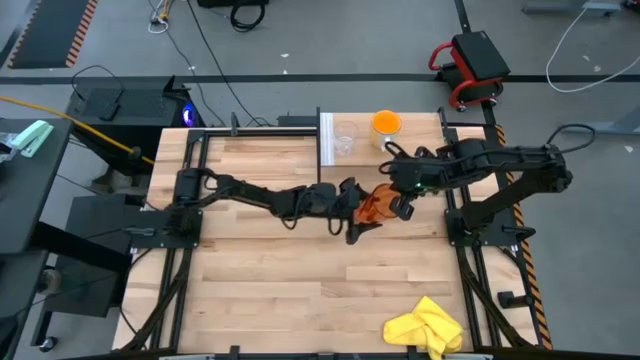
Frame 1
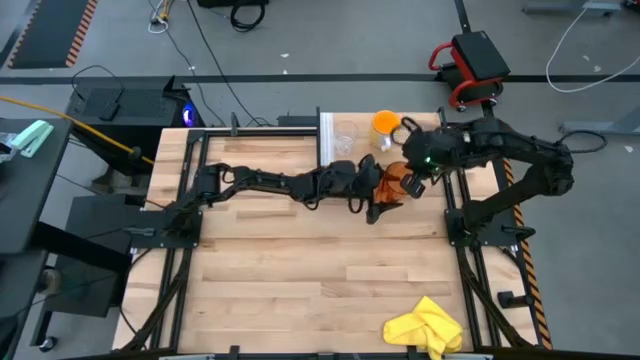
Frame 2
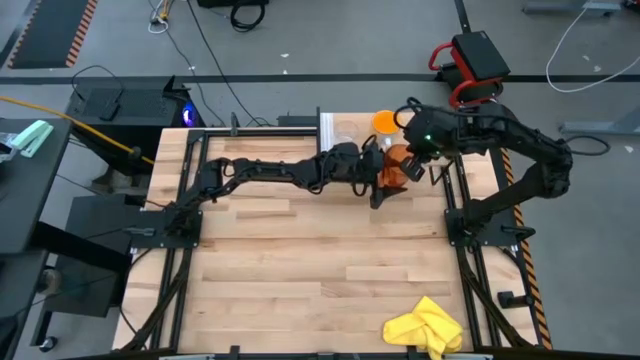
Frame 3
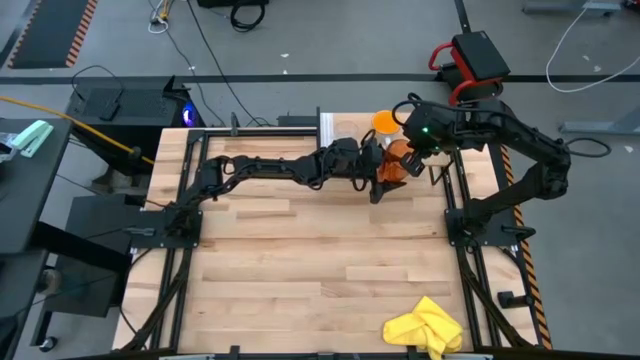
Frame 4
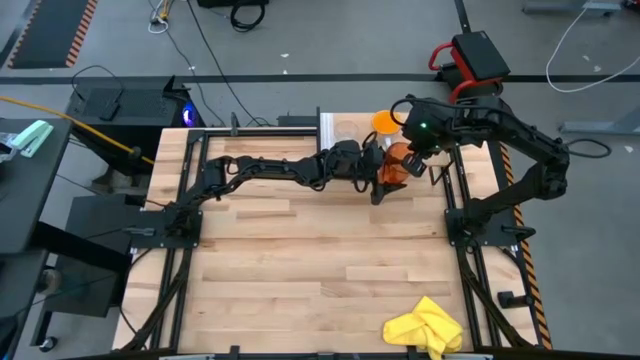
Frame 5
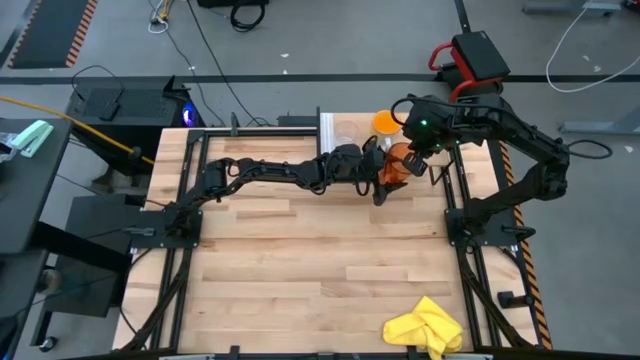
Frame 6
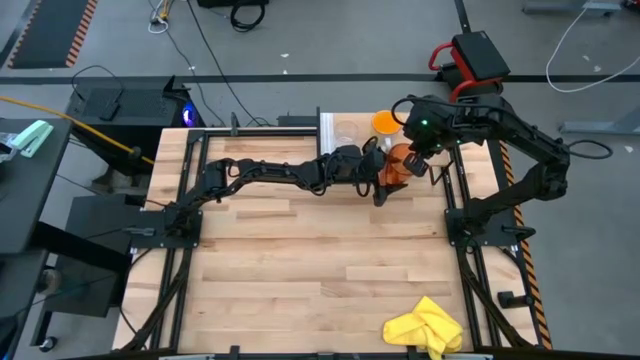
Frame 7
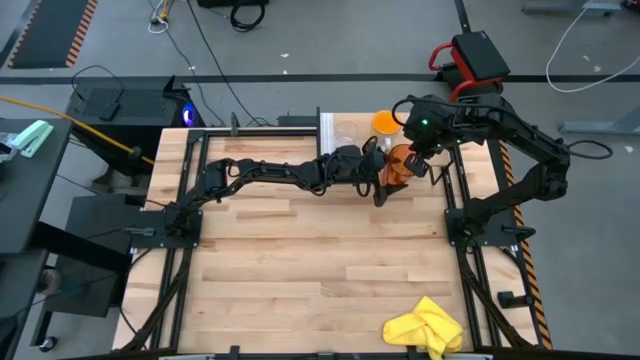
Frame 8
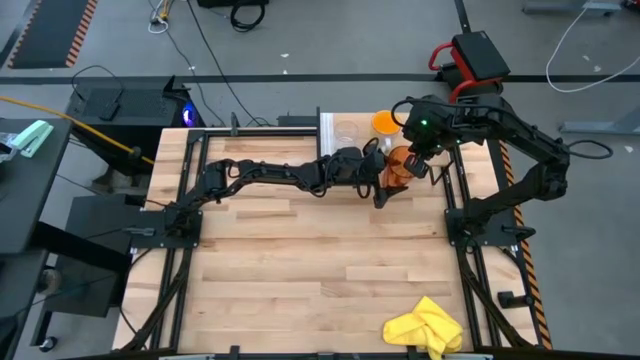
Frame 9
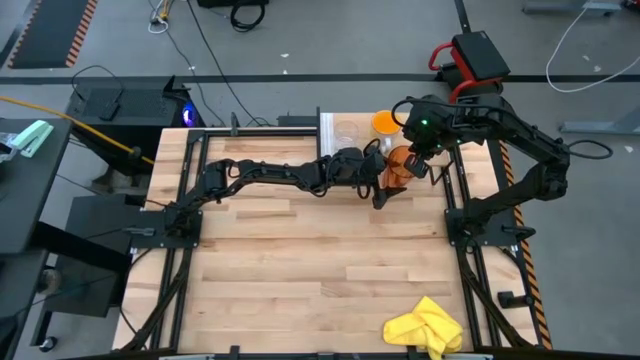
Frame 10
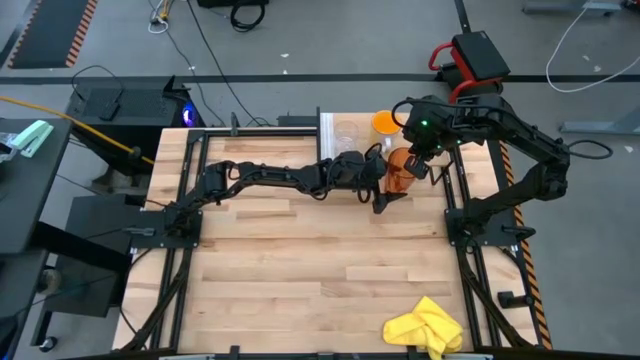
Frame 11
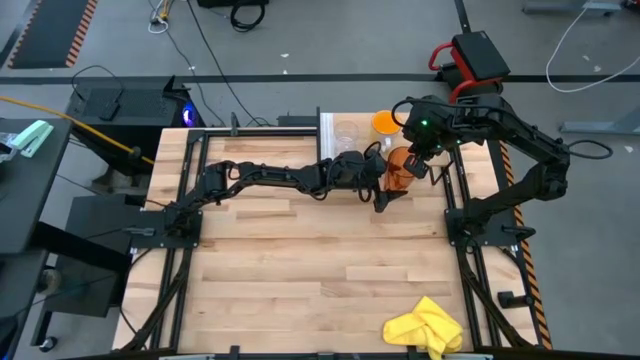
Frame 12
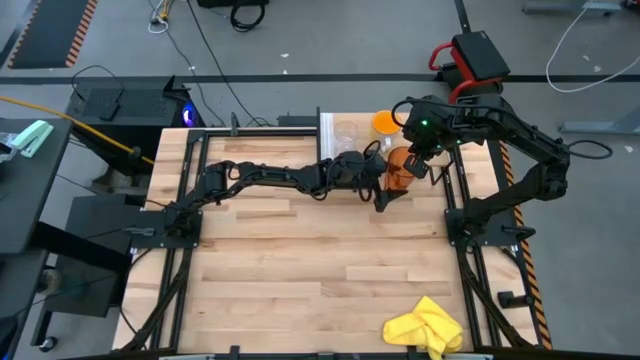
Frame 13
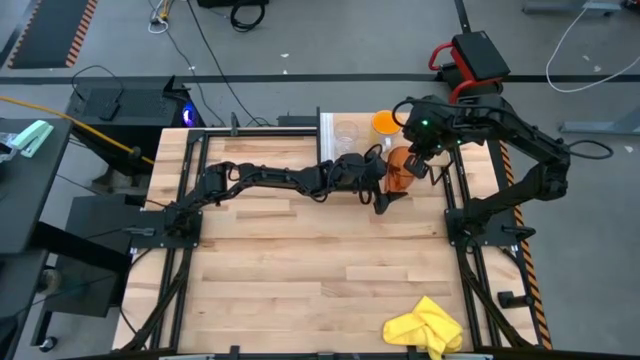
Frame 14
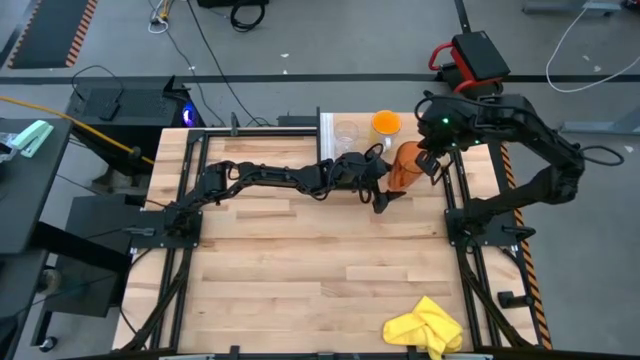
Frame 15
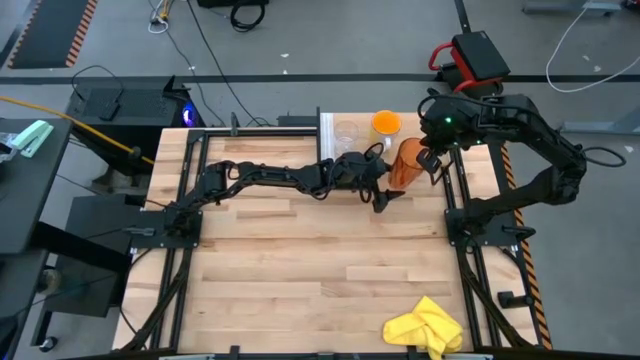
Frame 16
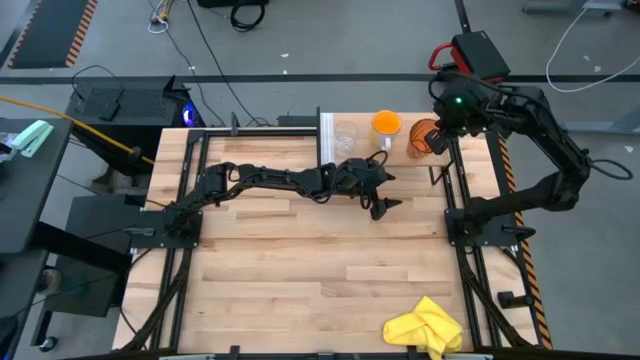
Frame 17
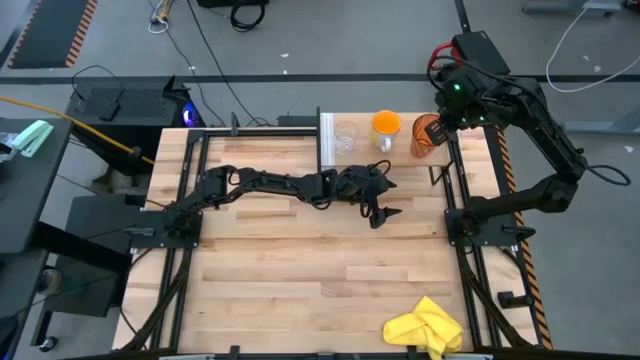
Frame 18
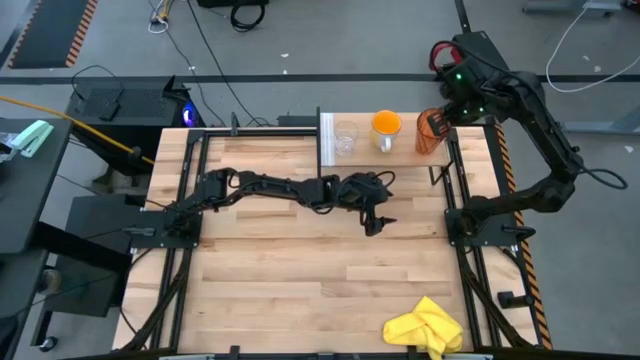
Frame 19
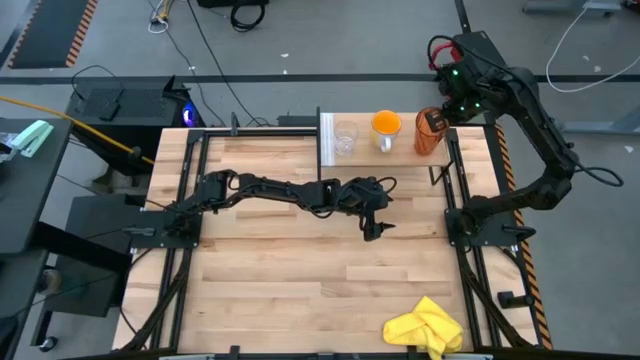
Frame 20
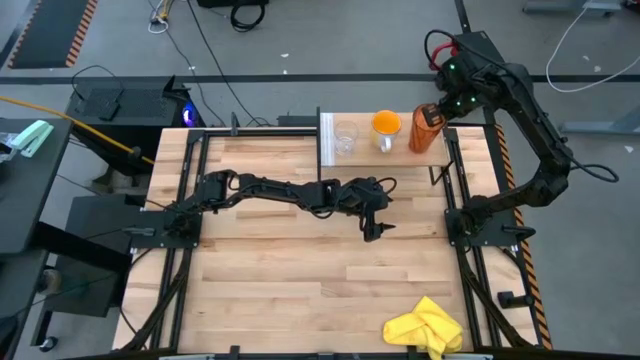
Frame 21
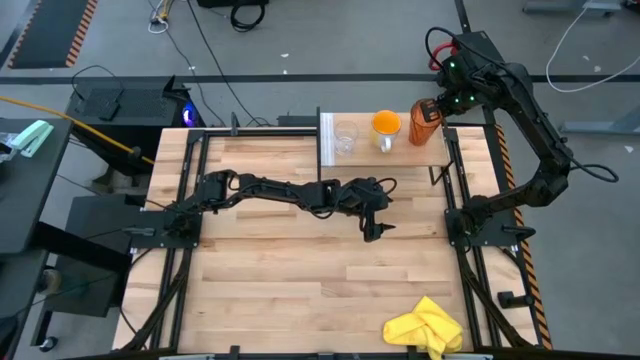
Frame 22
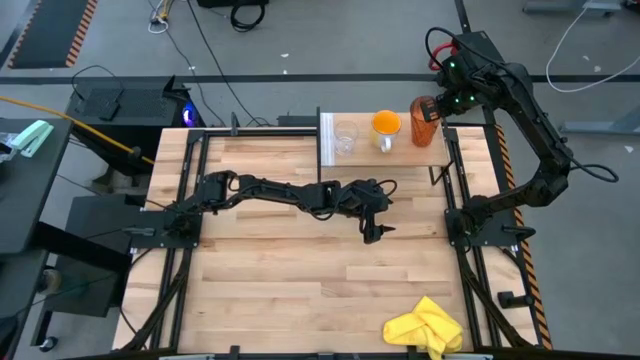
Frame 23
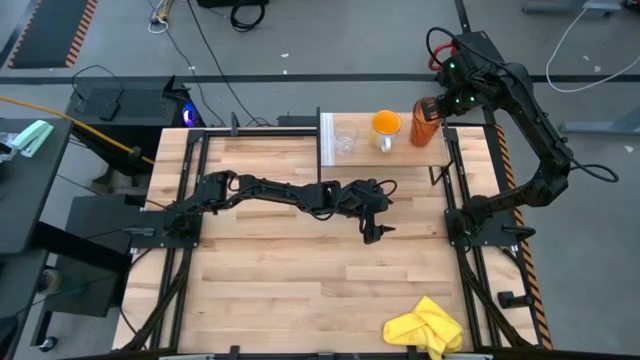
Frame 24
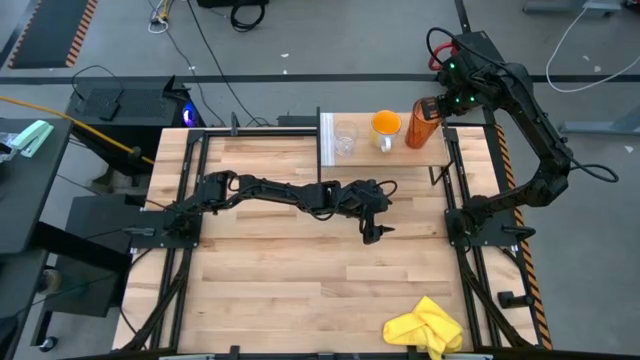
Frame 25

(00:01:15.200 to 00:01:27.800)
Task: Stack small to large cups/mugs on shelf
Put the brown cup on the shelf

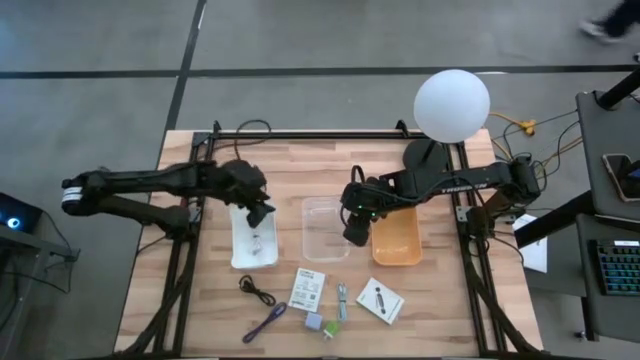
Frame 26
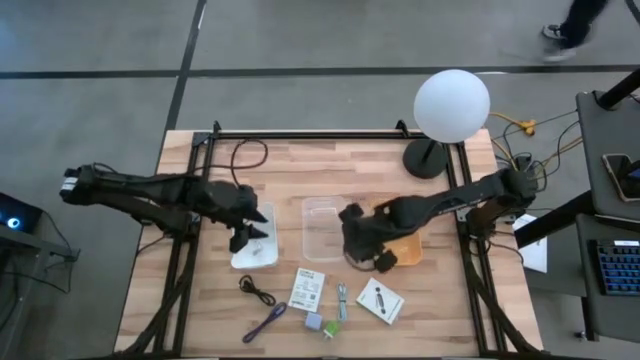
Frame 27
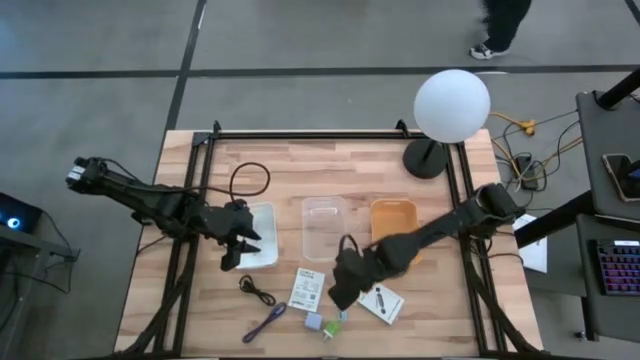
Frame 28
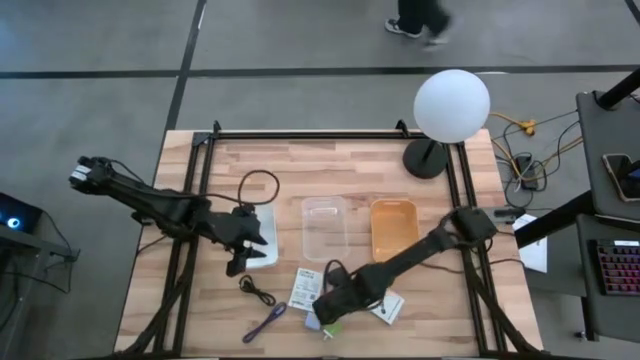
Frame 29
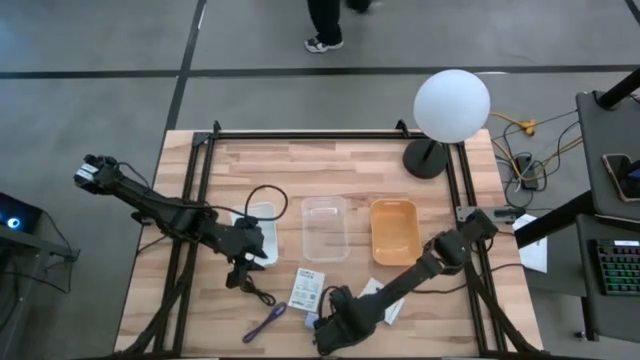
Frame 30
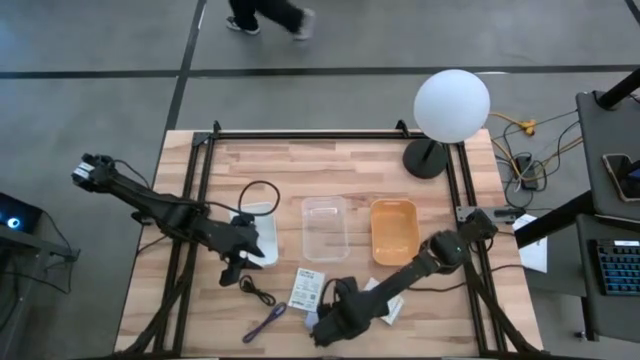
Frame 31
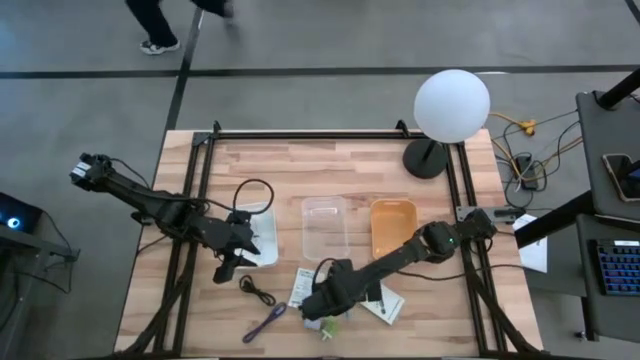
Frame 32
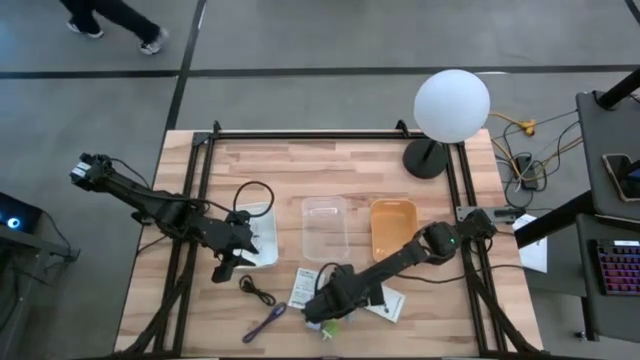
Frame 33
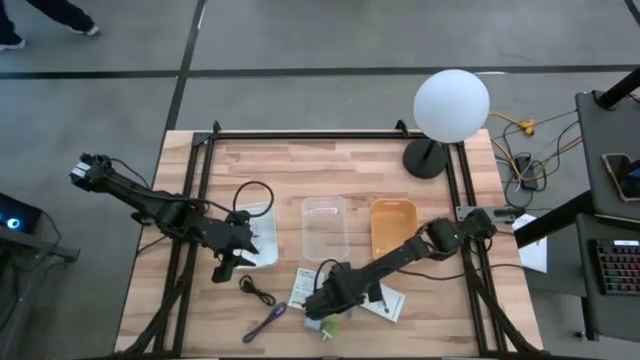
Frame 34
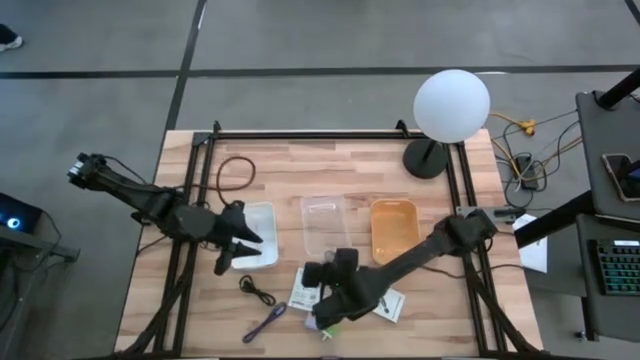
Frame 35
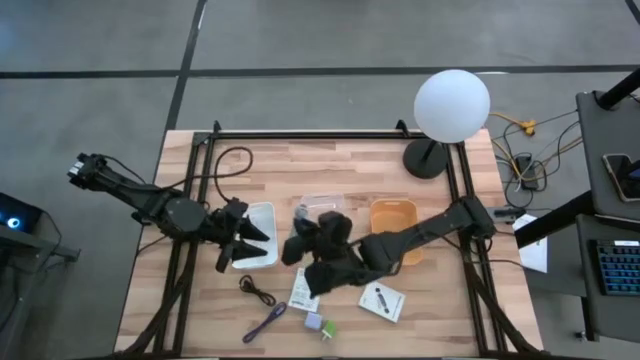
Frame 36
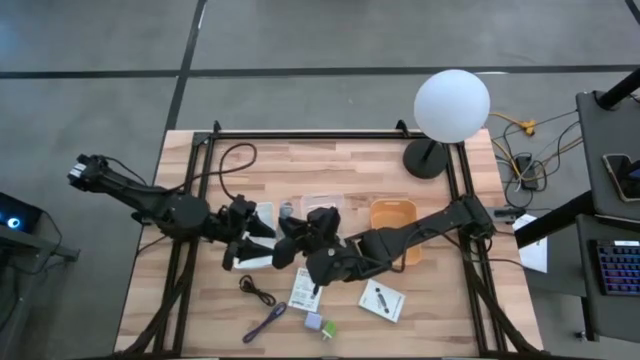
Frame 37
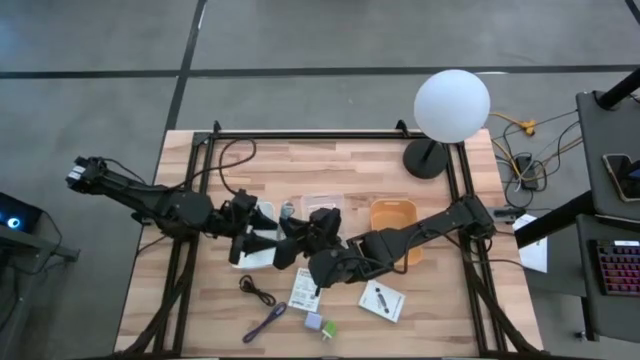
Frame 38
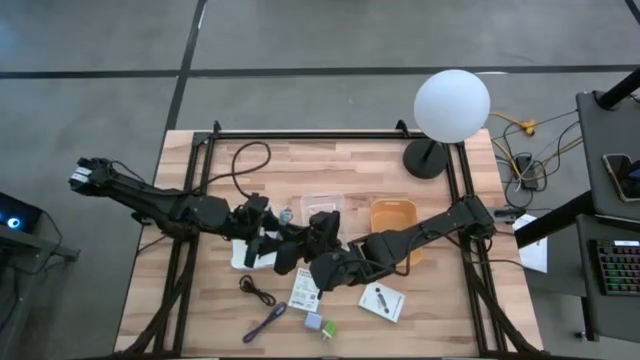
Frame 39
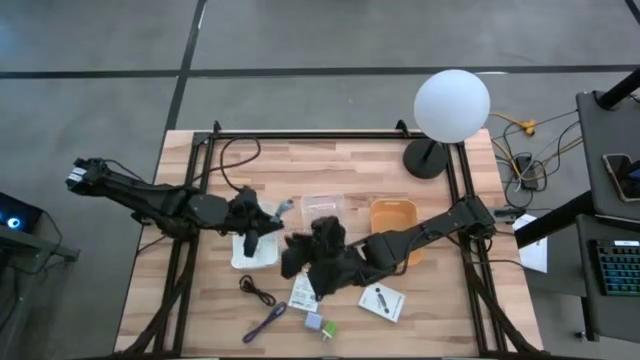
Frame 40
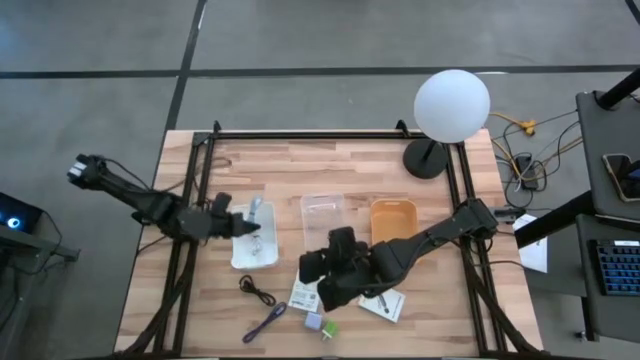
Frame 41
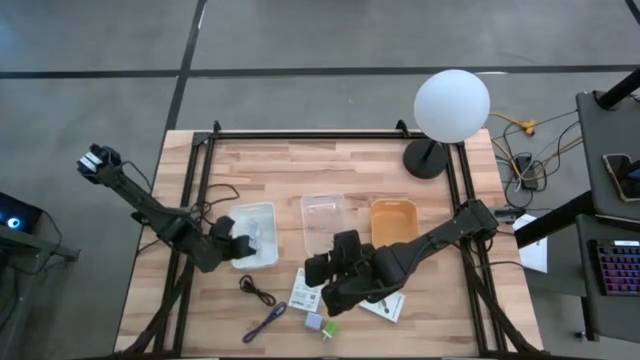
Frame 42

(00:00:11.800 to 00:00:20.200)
Task: Pick and place items into bin
Put the light blue charger cable into the white bin

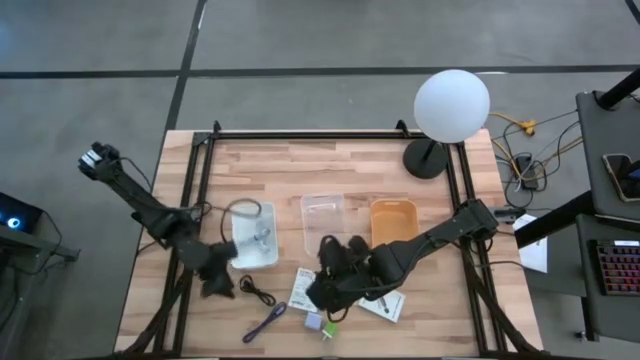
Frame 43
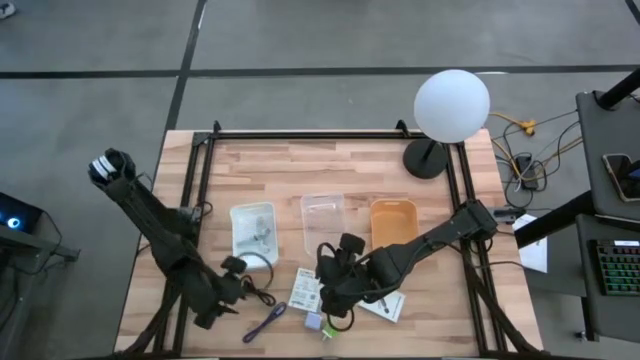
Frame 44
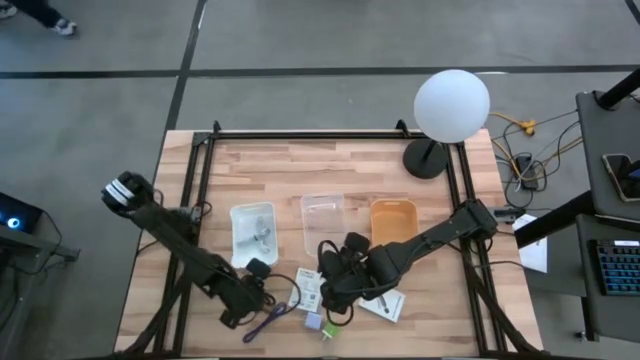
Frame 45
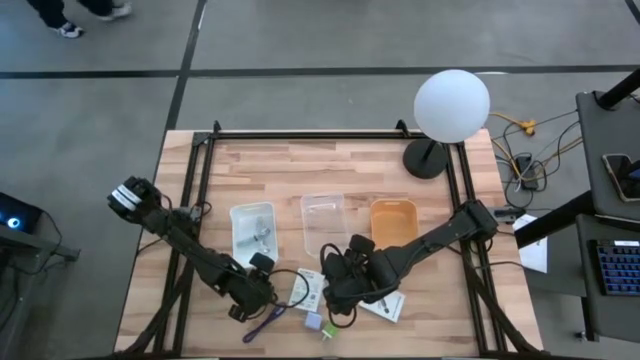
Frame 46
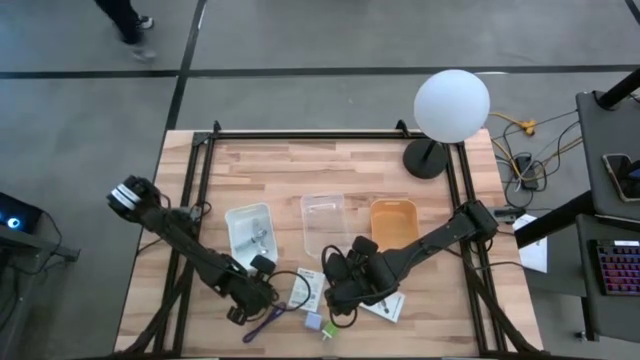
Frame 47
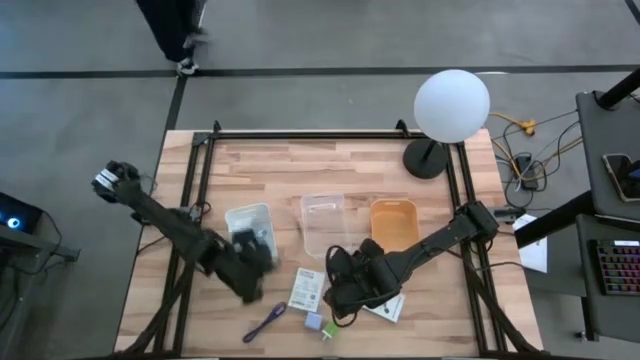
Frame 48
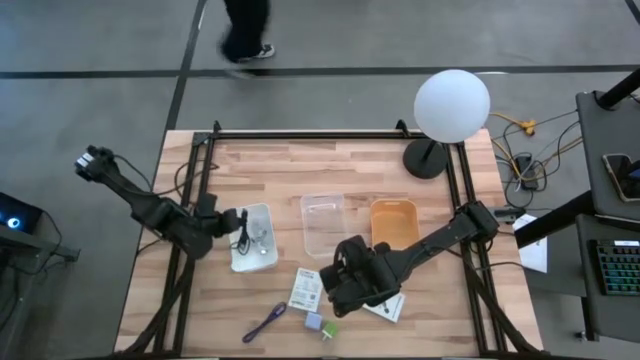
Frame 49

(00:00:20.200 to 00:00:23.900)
Put the black charger cable into the white bin
